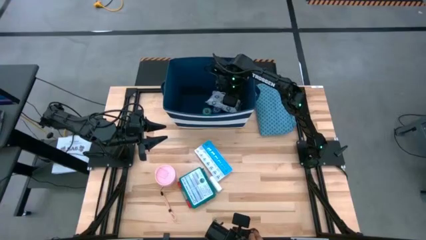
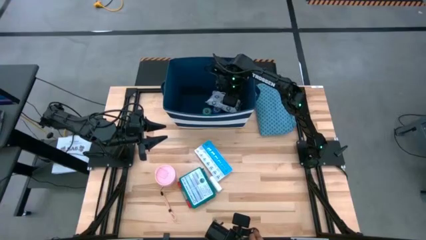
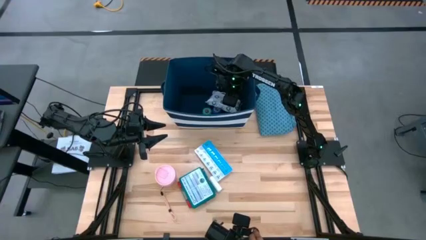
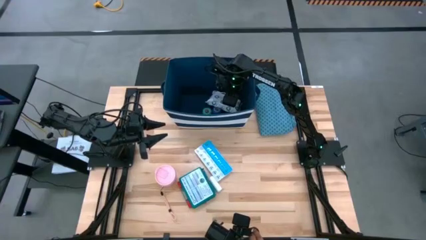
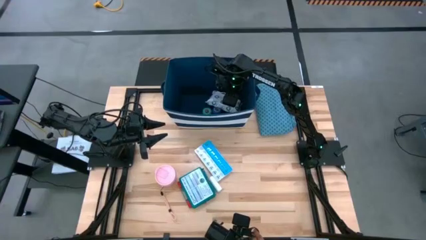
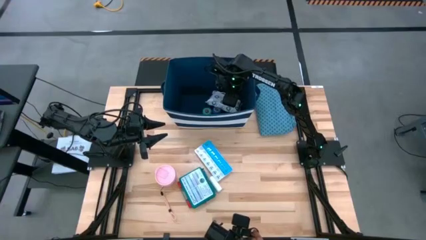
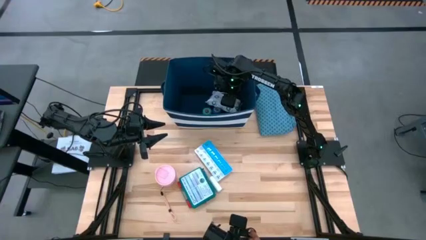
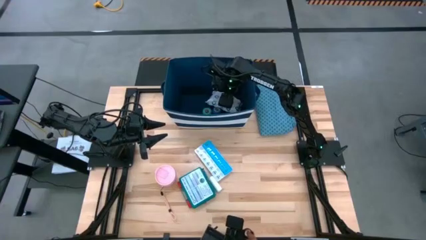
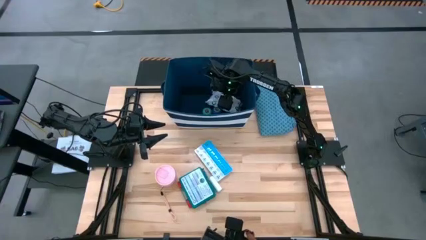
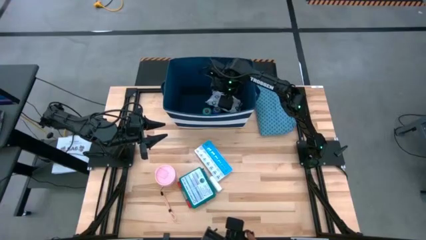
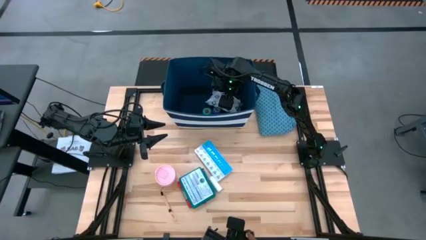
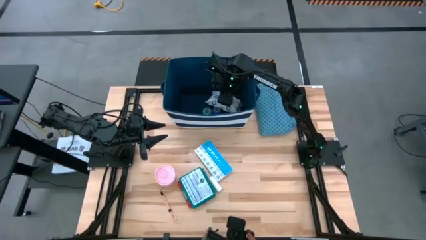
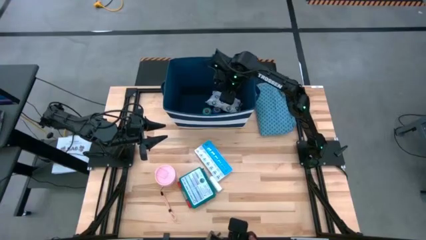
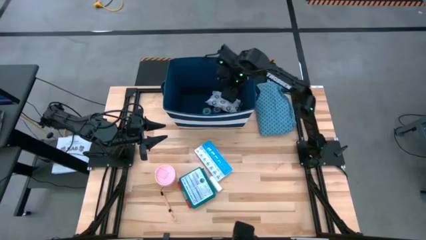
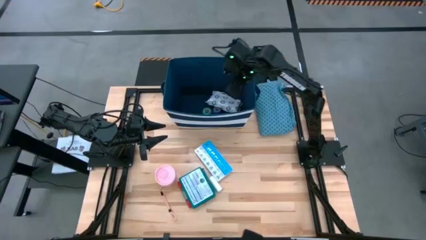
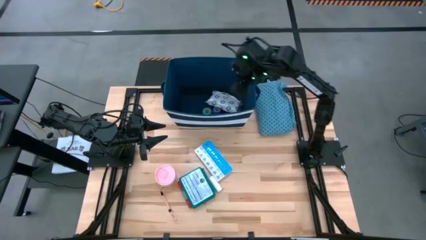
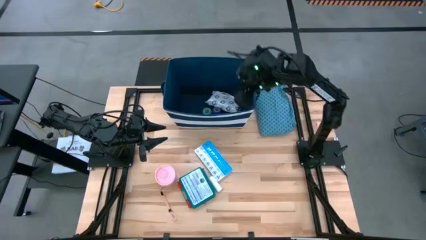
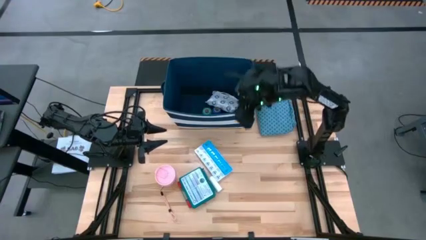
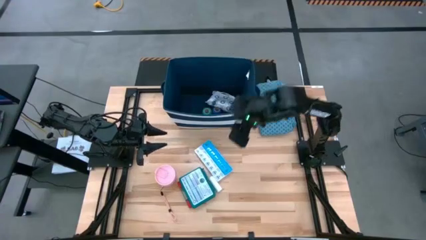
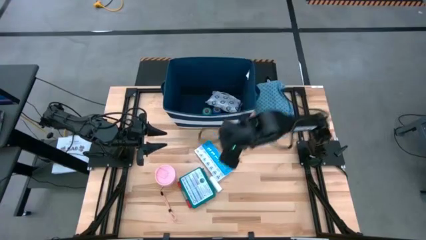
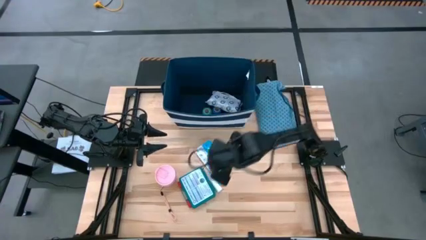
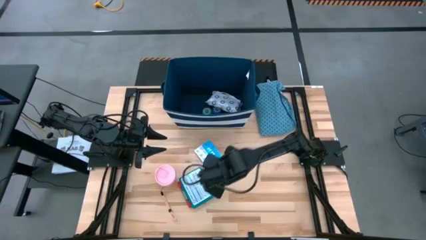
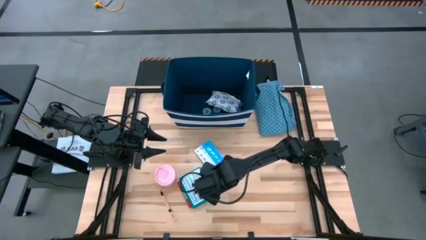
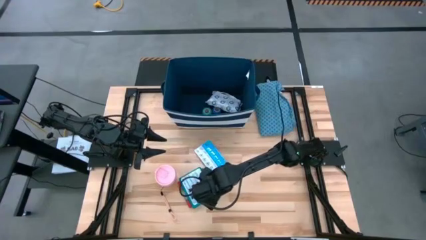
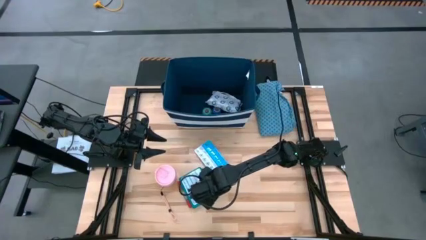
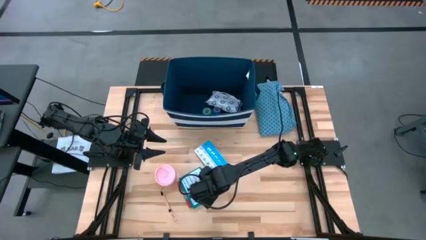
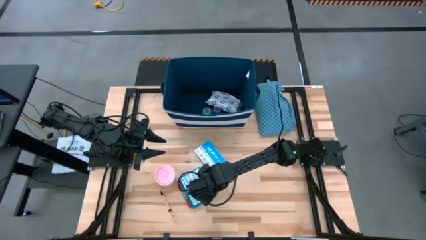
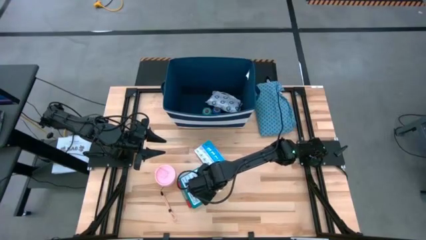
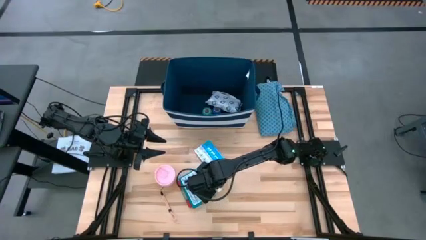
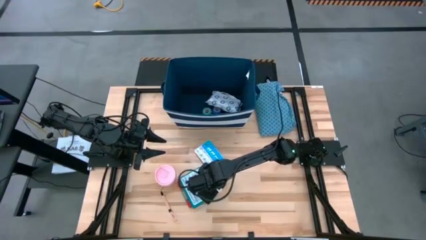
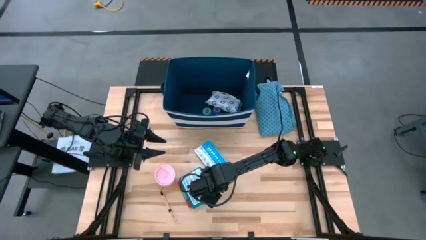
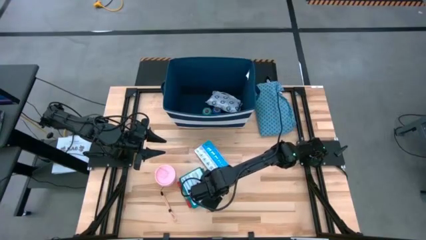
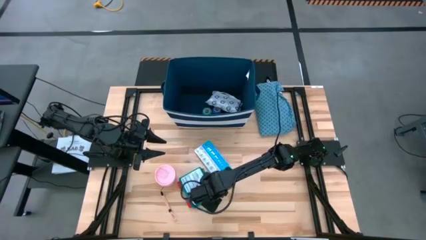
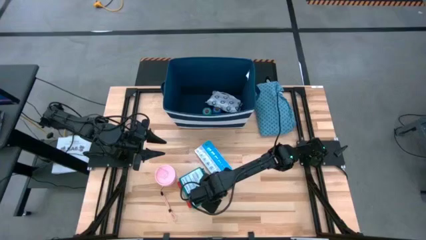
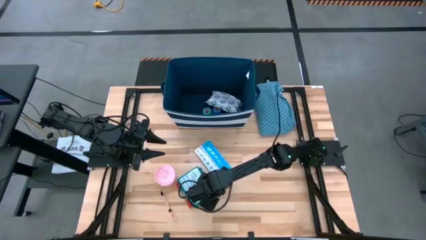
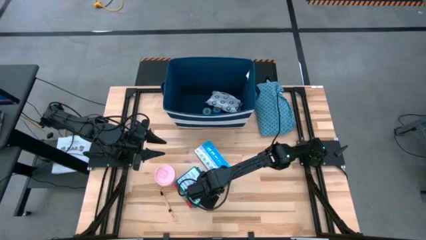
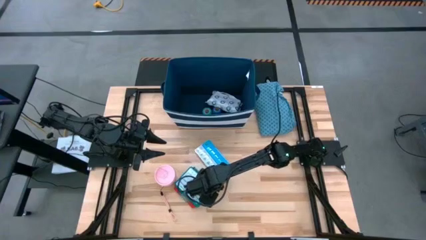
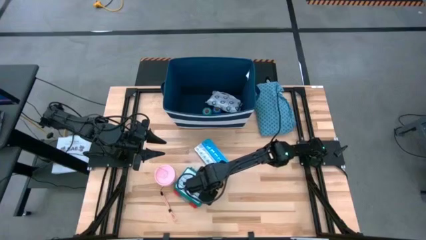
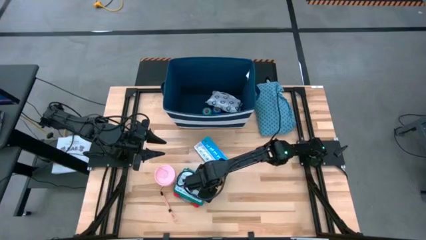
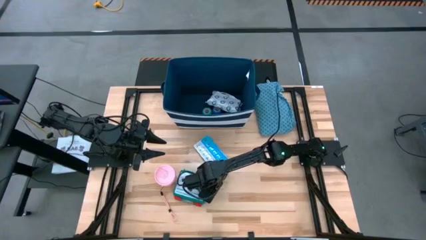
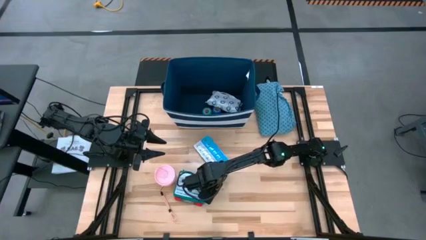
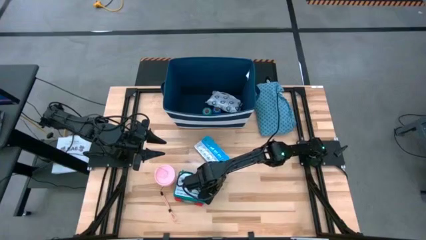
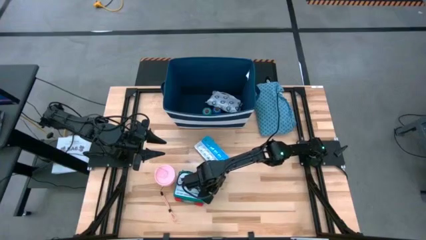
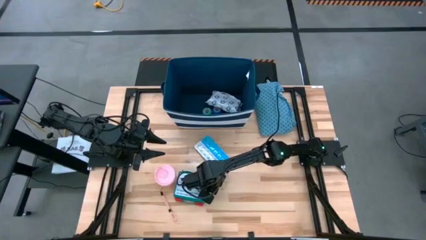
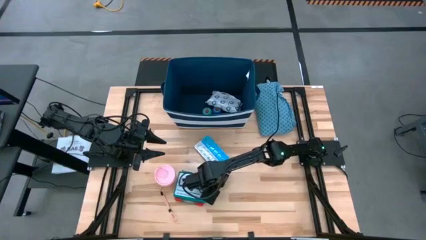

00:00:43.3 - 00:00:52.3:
Task: Pick & place medical supplies in basket/bin
Put the white gauze into the bin

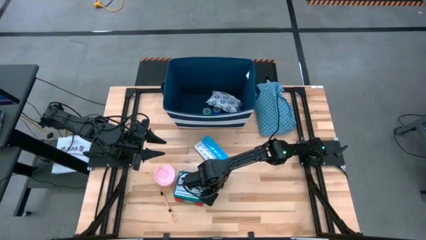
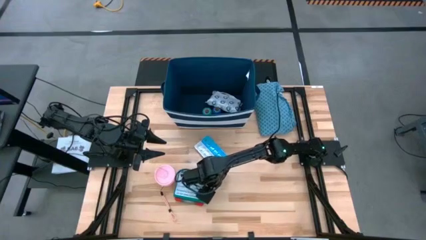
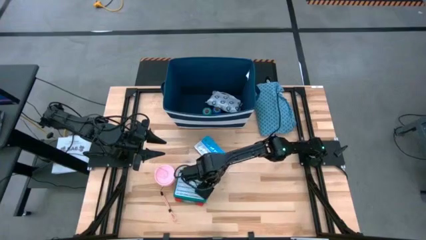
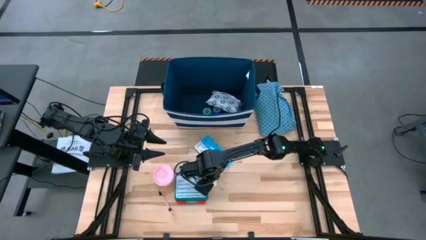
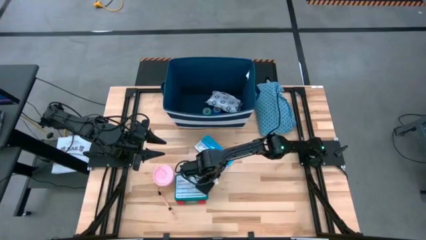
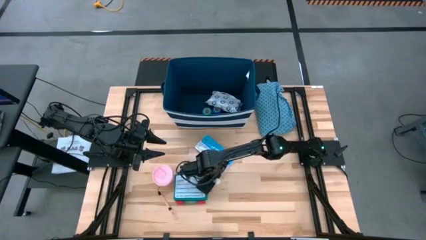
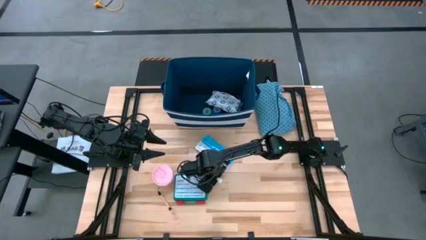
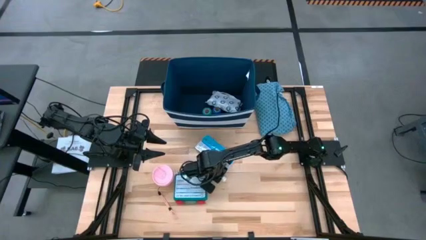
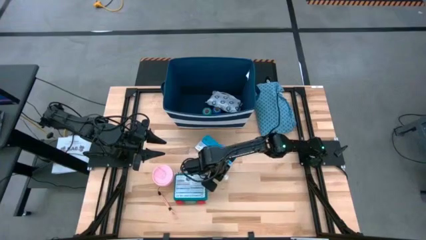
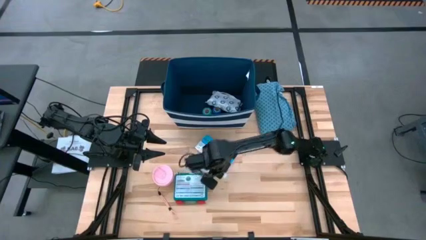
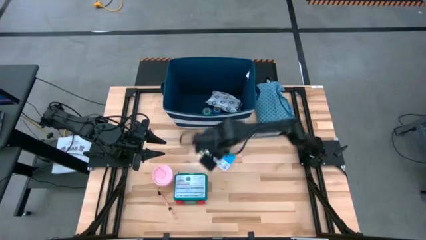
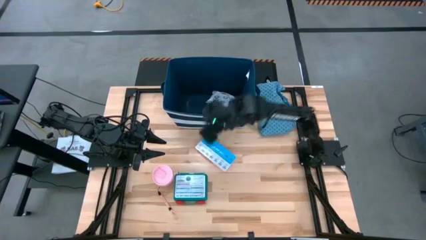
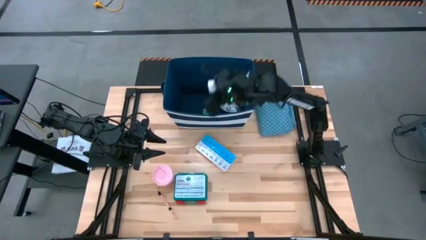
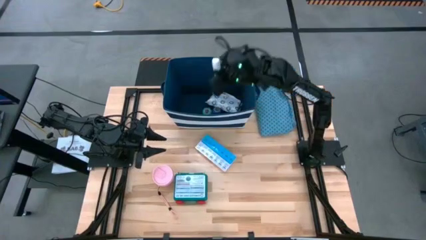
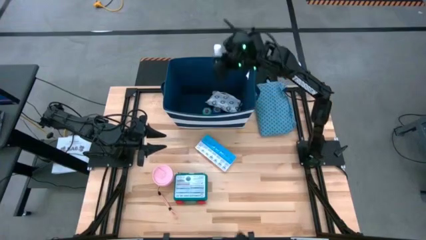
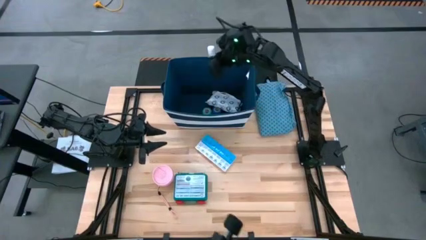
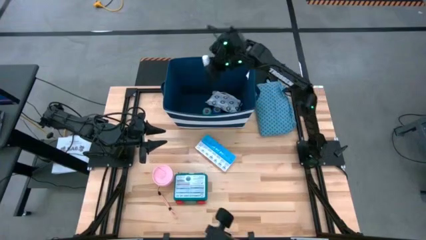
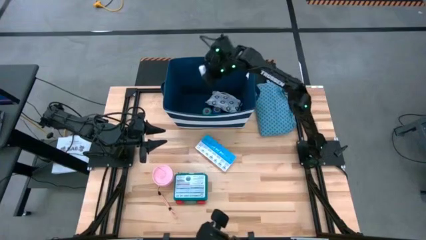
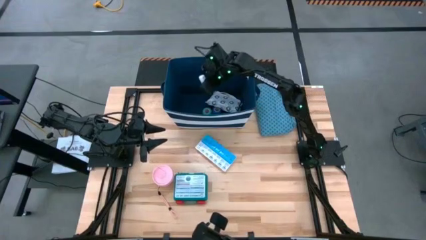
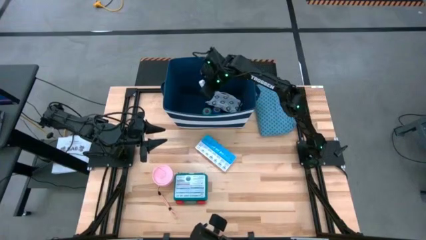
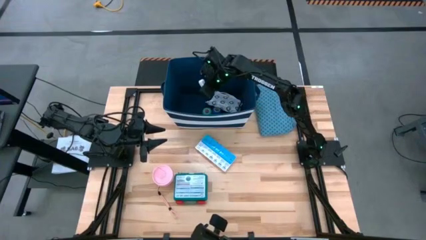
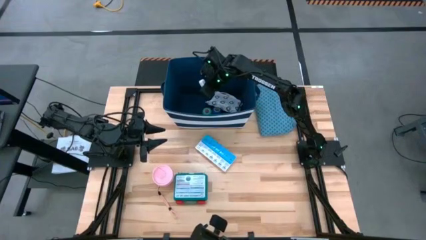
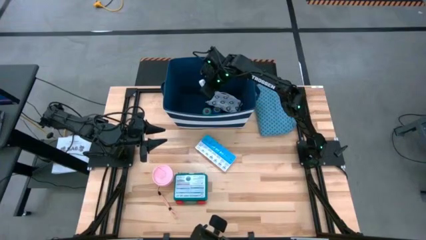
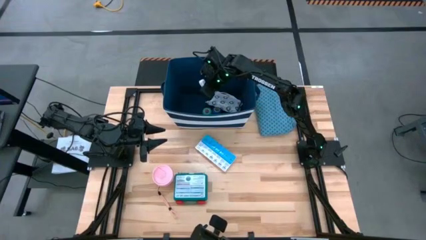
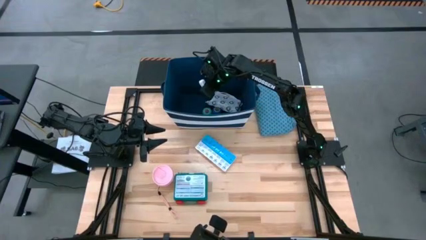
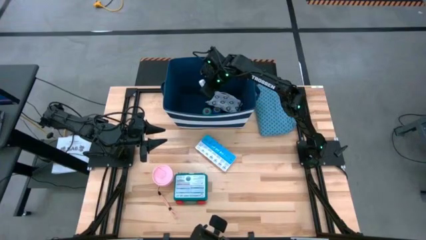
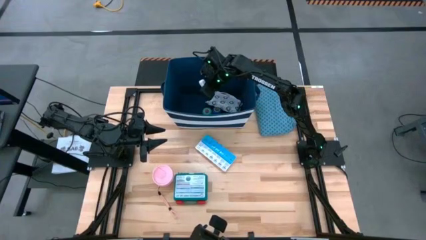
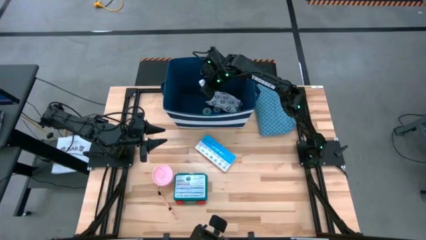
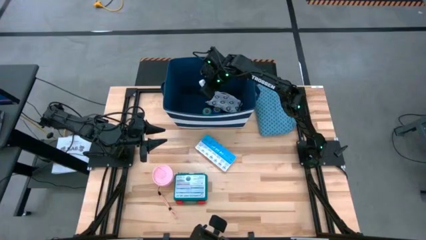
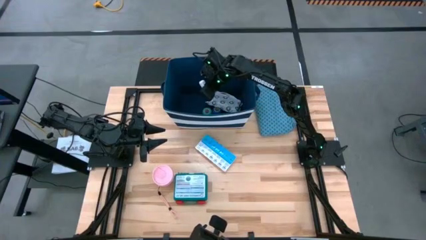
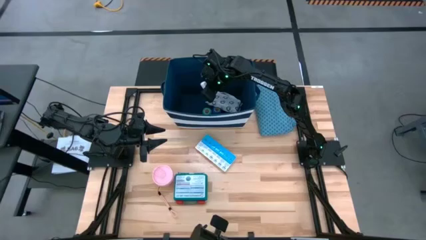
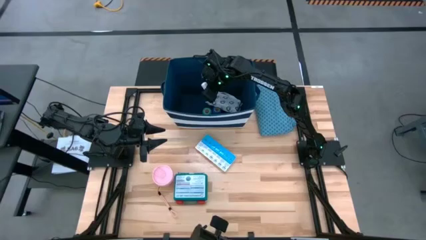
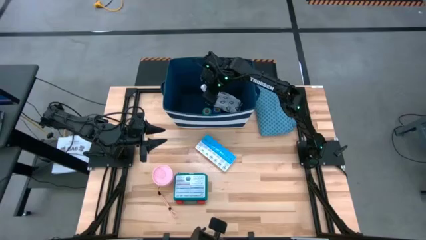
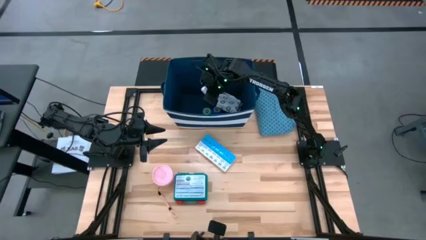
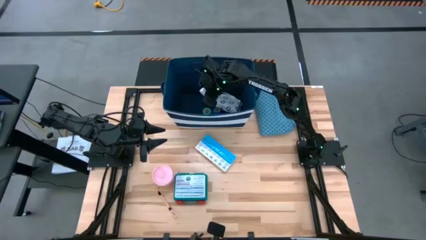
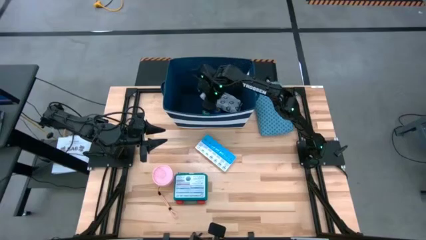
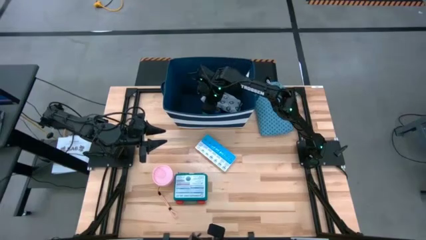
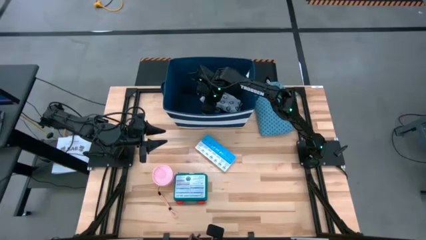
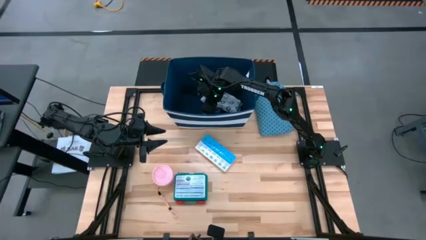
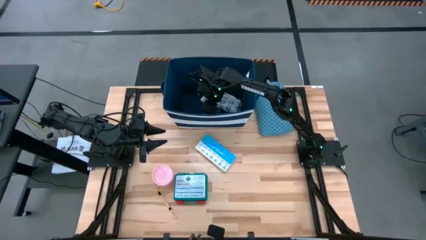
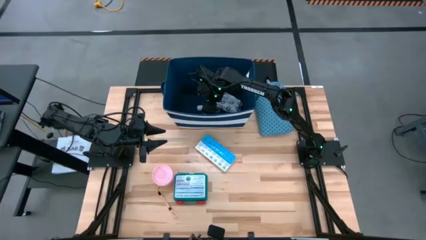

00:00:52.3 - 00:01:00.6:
Put the white gauze into the bin
